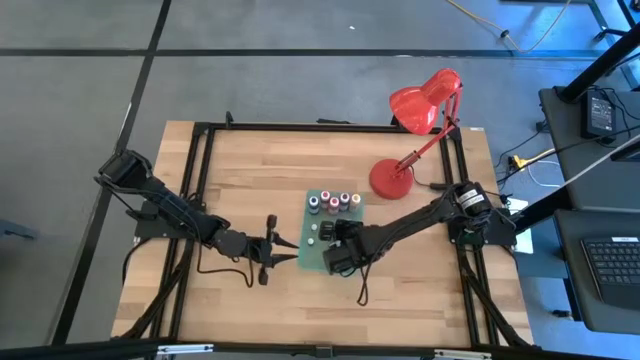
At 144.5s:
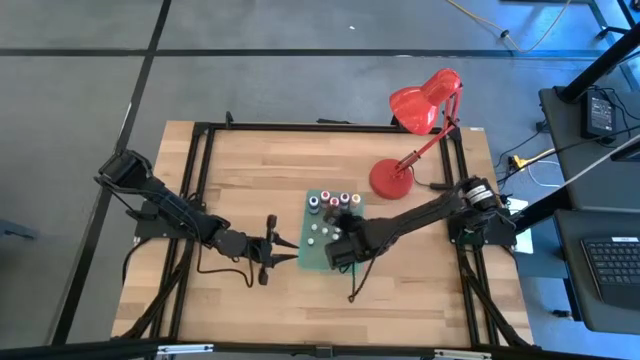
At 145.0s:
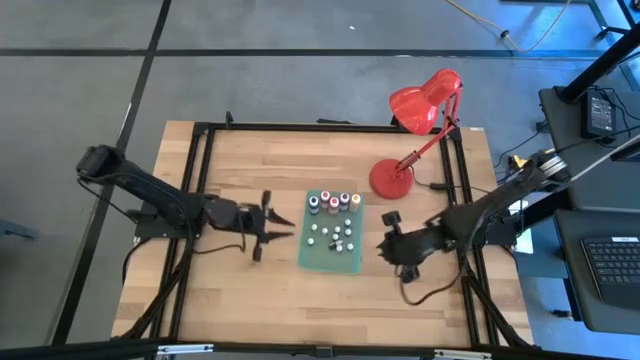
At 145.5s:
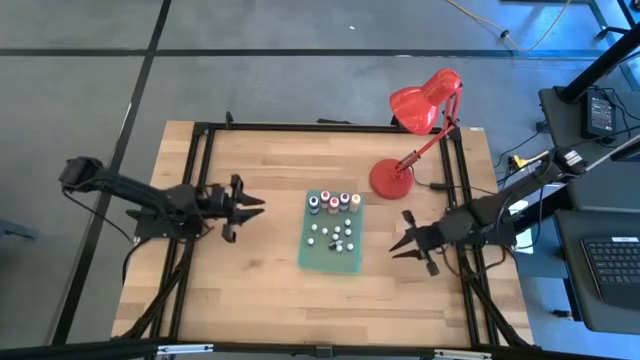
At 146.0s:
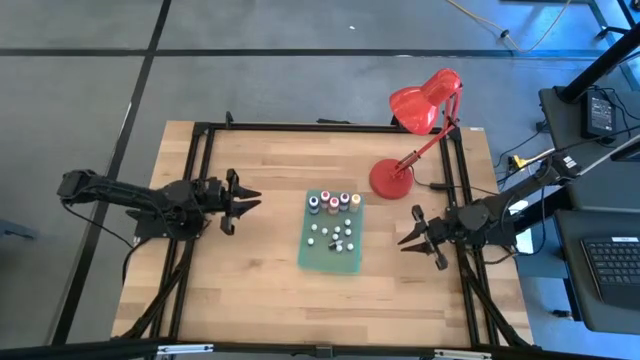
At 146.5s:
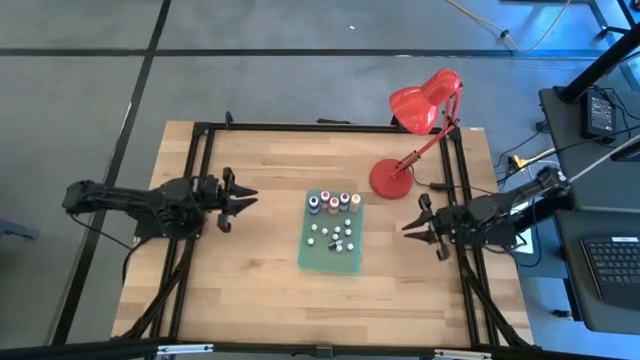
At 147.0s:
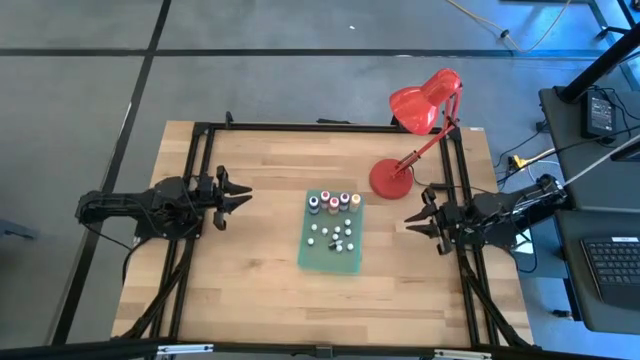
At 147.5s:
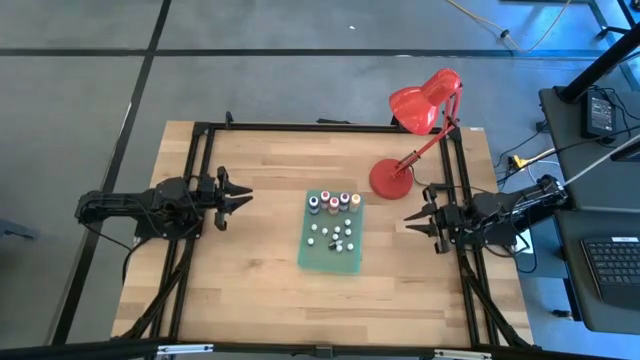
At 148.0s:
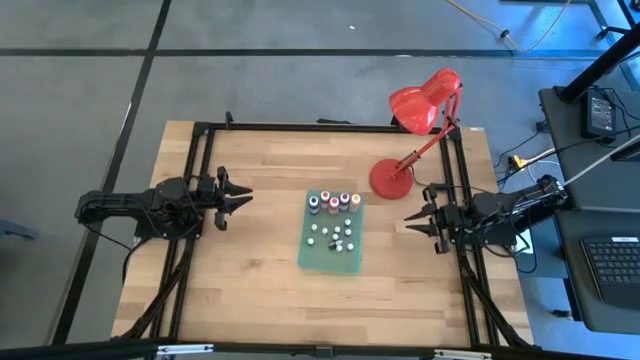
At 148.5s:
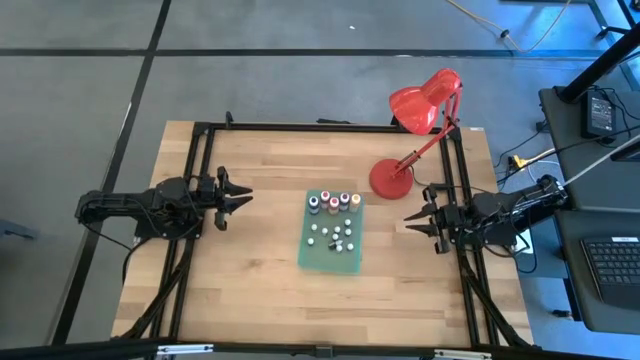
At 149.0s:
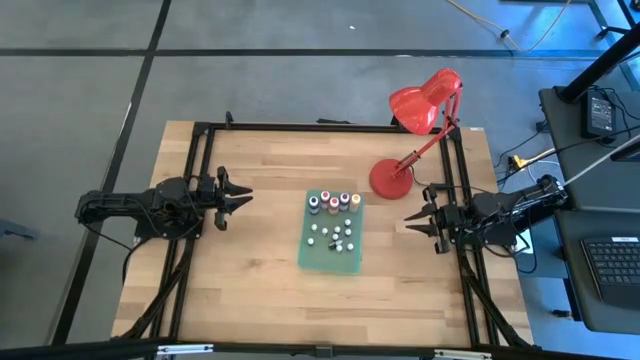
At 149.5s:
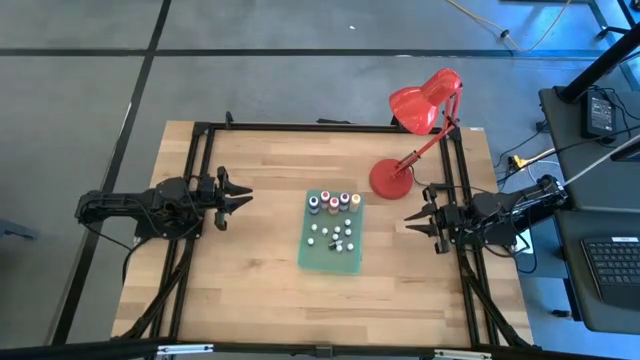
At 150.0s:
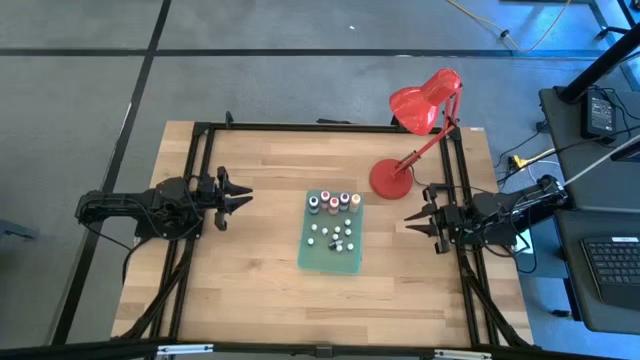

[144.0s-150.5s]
Task: Pick & Place food coloring
Return to Home Position

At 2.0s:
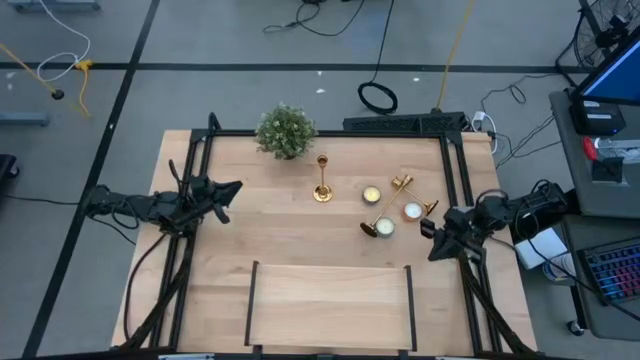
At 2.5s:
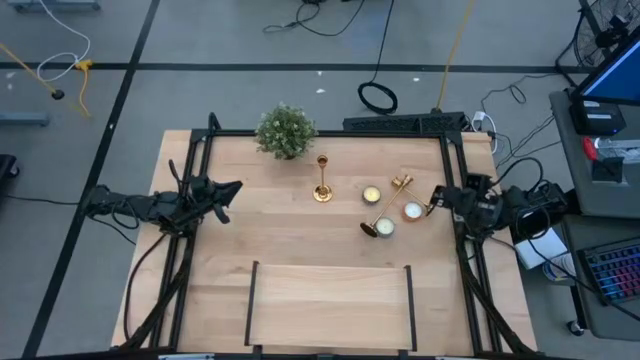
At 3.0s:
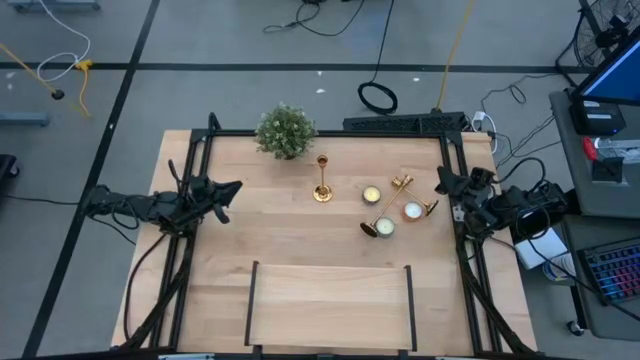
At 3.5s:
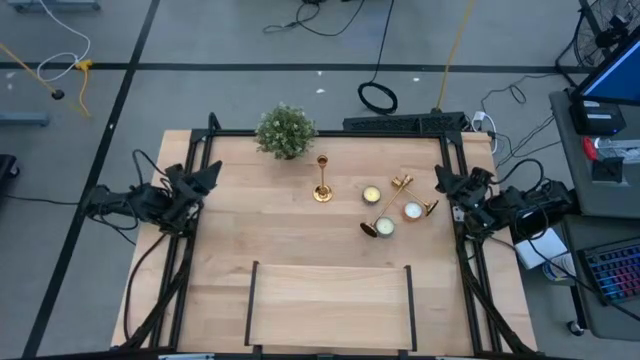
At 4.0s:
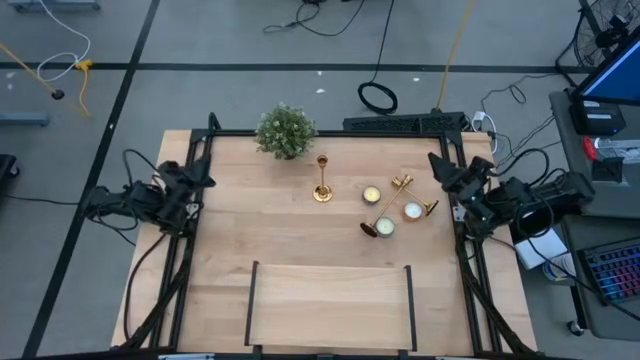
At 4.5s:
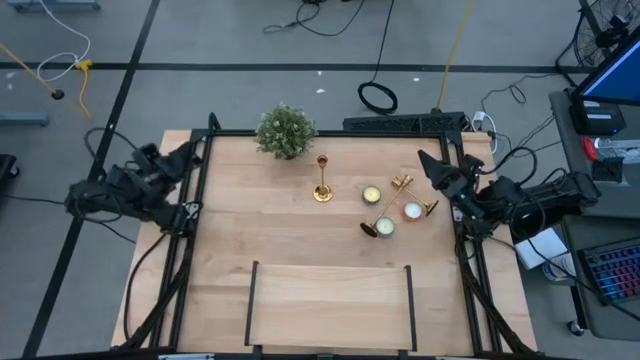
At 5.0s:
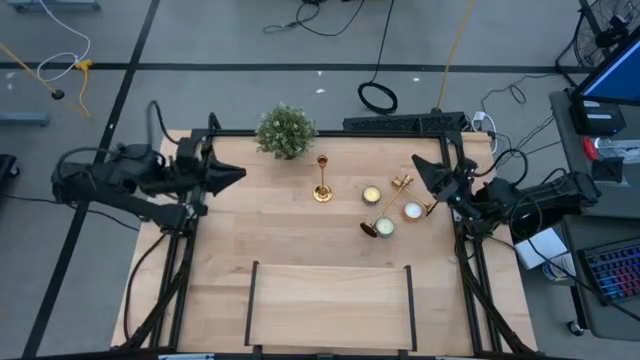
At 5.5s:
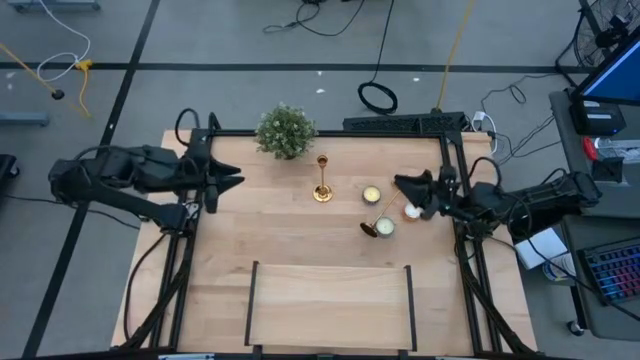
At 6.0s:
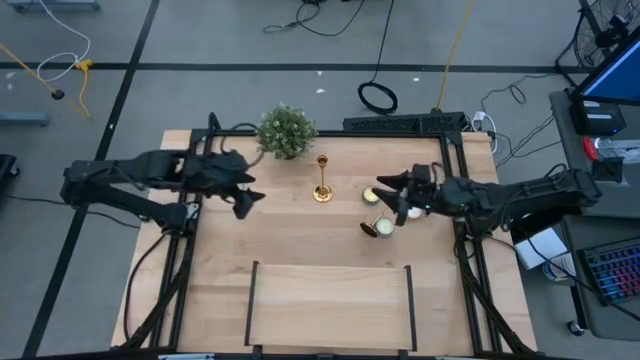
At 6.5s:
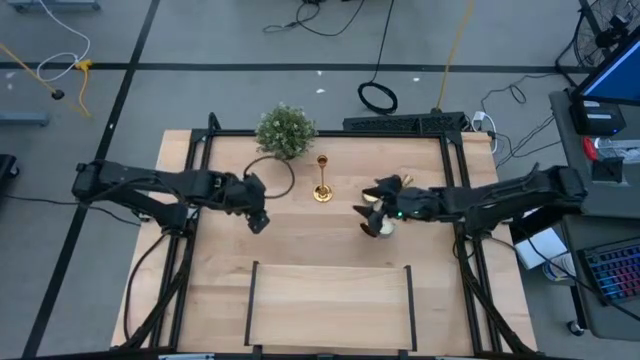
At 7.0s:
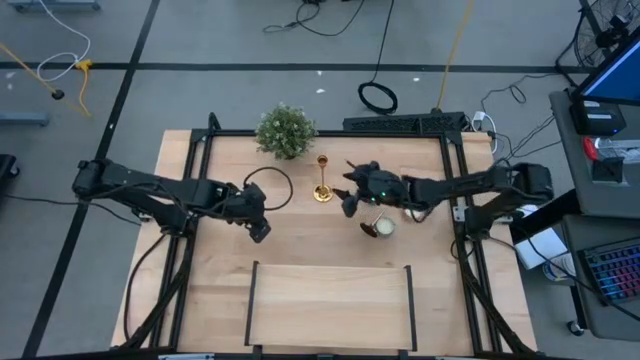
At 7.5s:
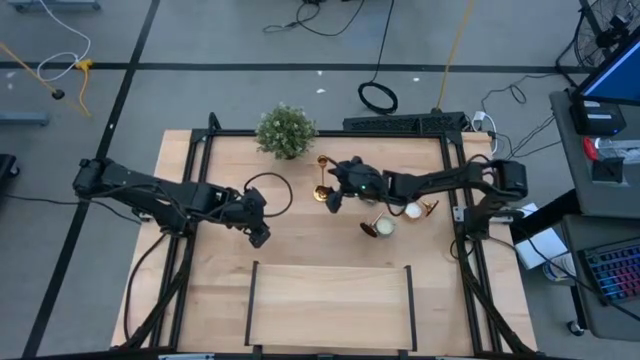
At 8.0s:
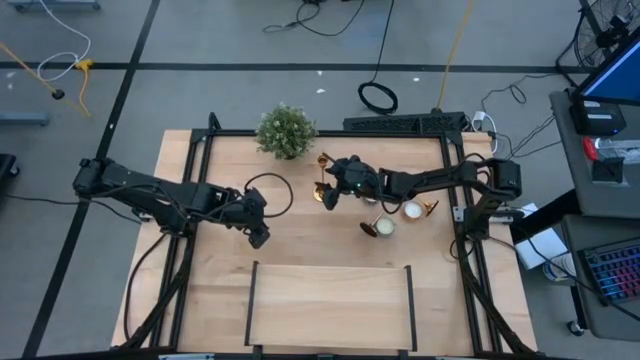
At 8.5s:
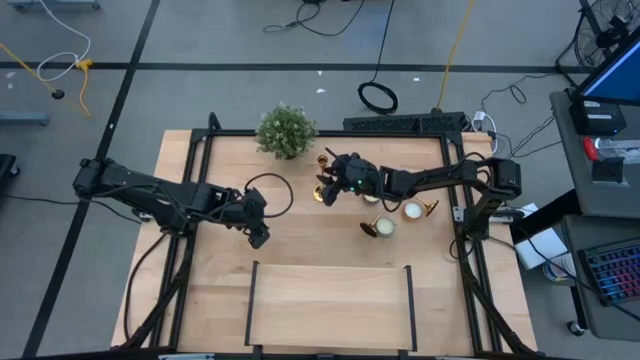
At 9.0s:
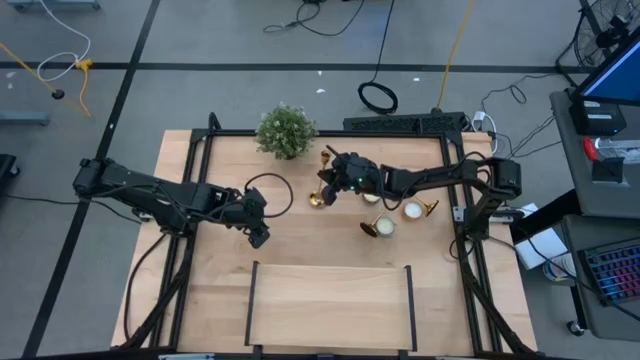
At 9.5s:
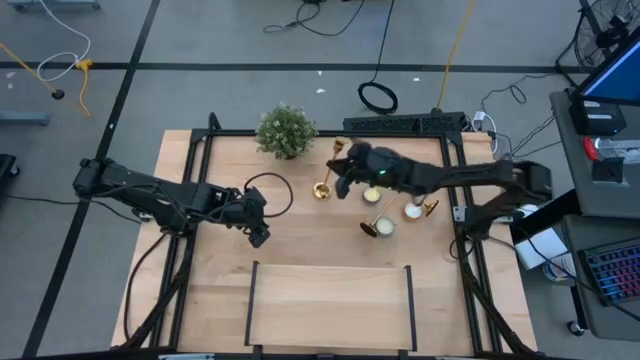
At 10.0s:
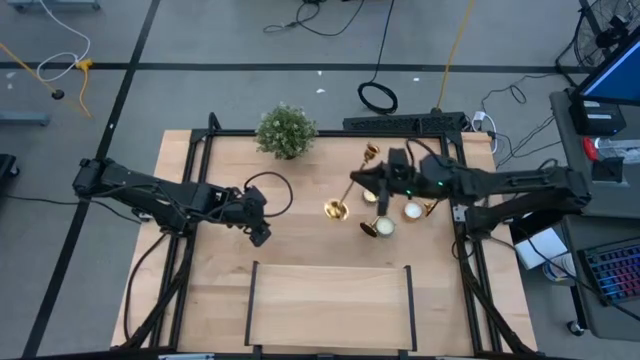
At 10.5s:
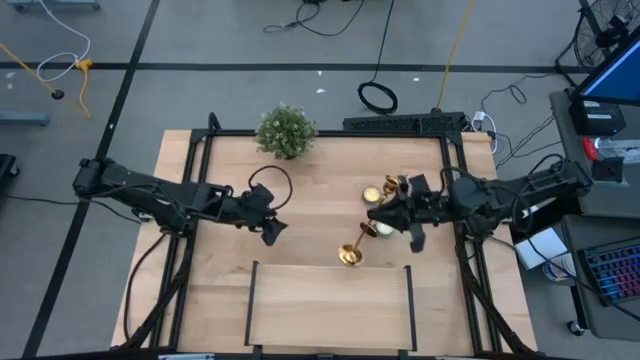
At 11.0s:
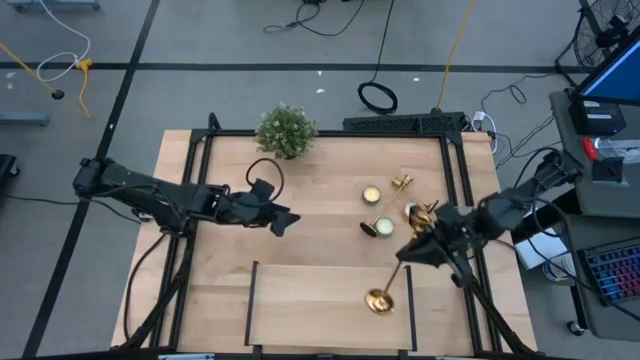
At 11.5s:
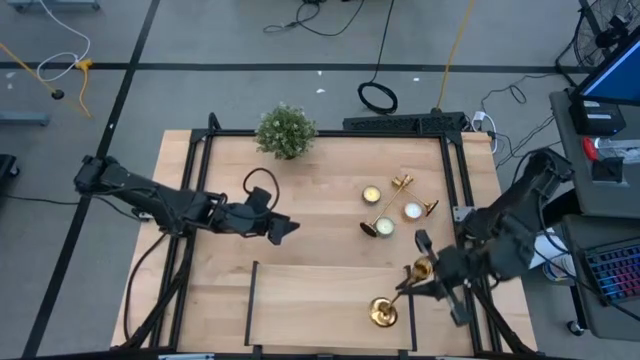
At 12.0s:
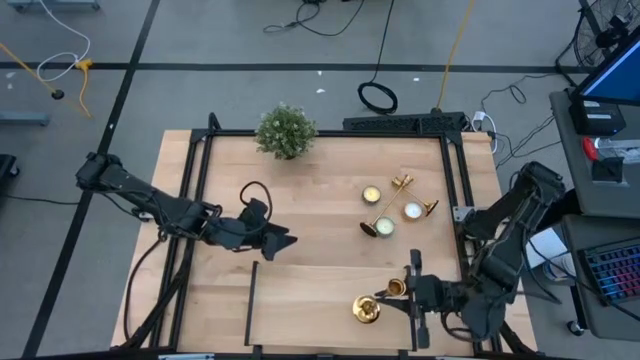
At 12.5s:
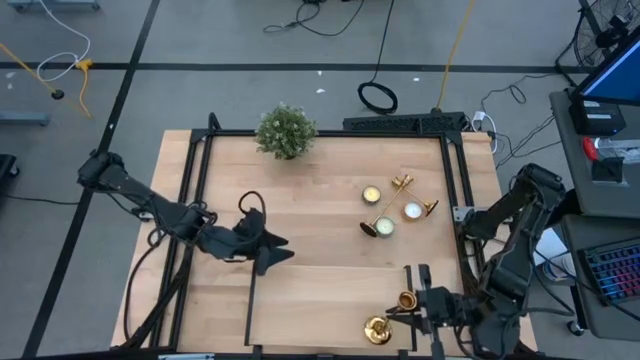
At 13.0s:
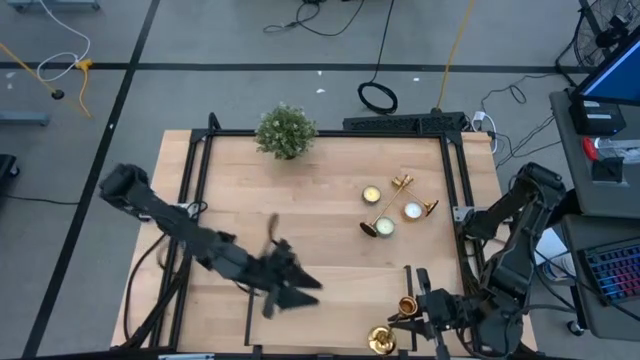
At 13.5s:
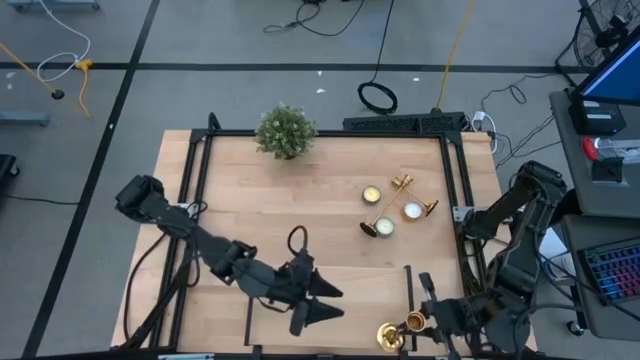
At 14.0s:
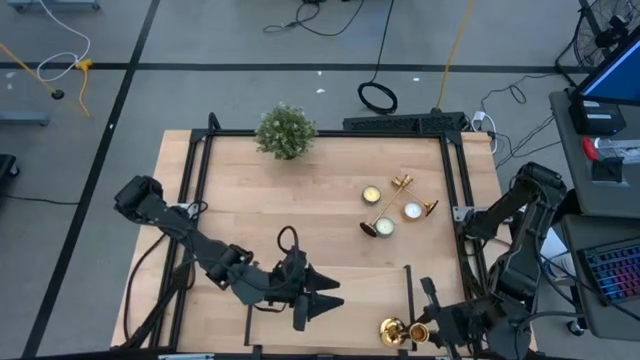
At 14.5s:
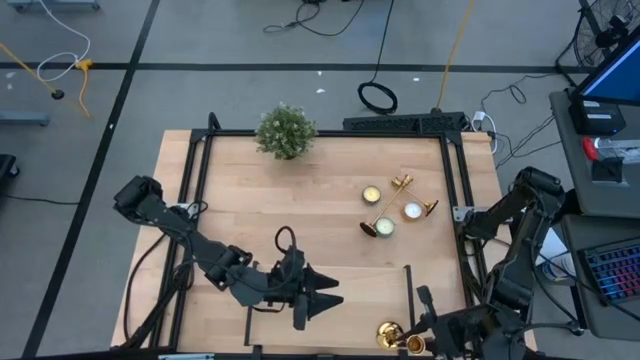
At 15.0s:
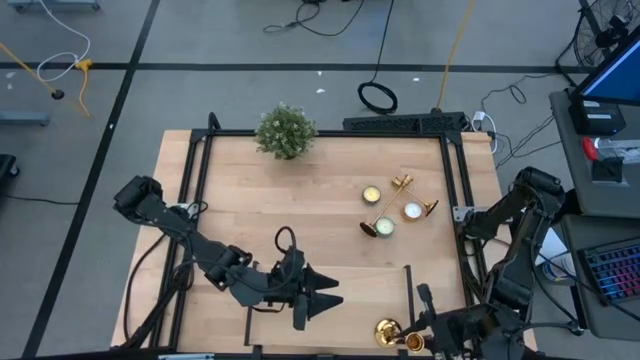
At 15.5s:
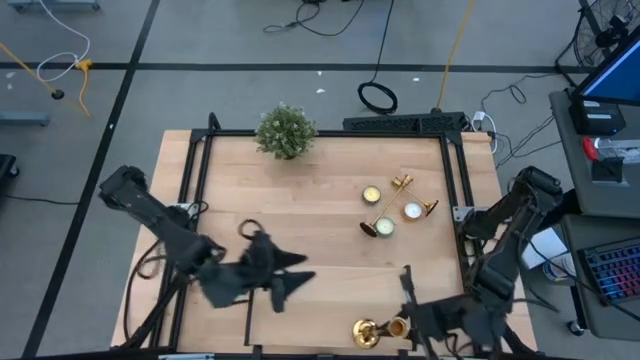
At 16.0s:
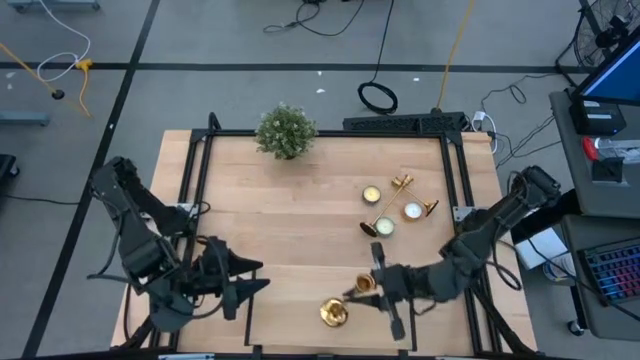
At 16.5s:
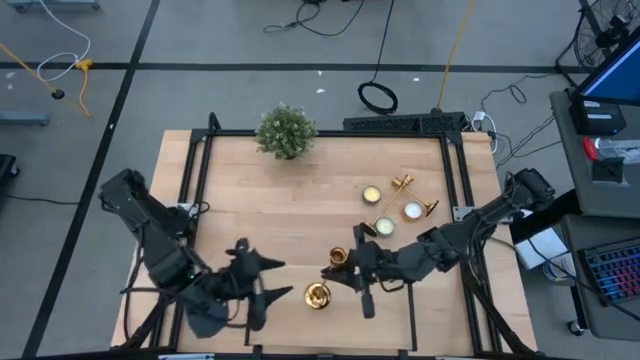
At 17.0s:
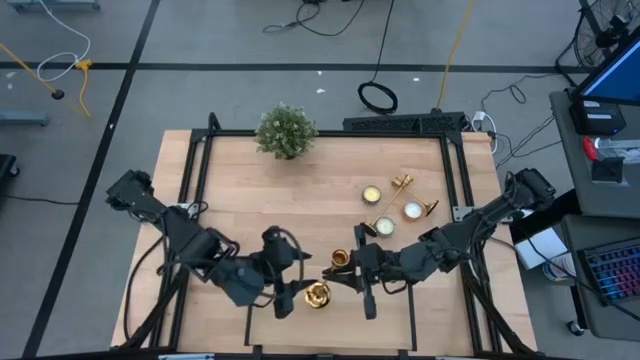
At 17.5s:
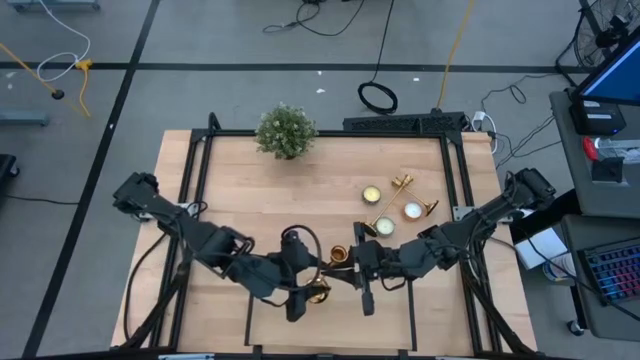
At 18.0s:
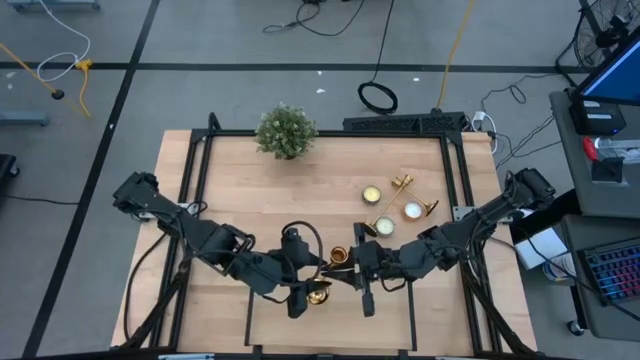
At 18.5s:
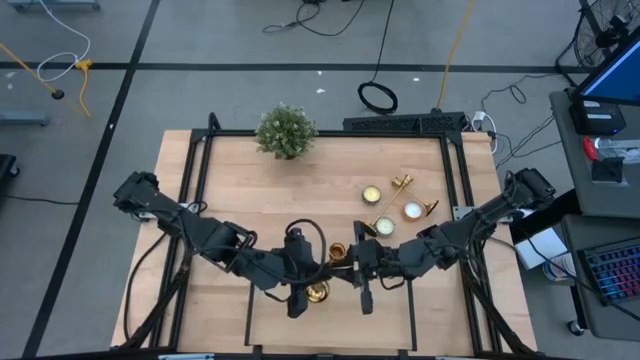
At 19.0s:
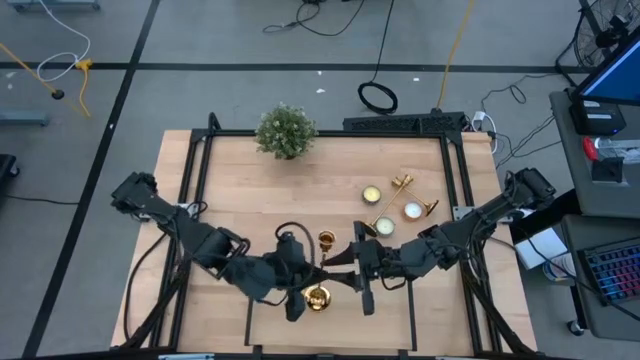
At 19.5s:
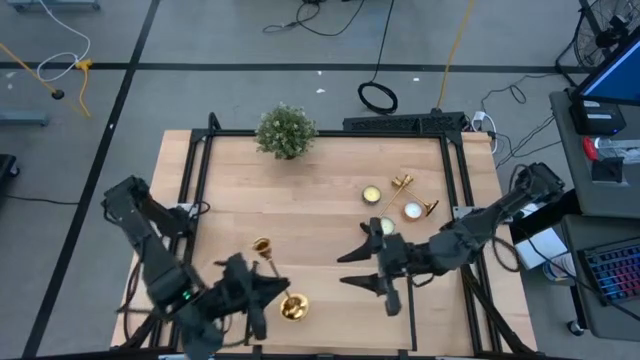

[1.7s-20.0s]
Task: Pick & Place candle stick holders
Put the left gold candle holder on the shelf
